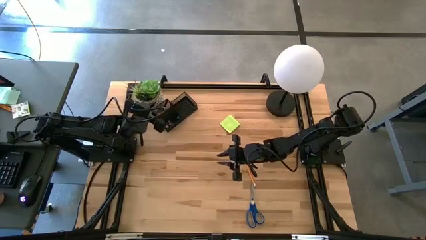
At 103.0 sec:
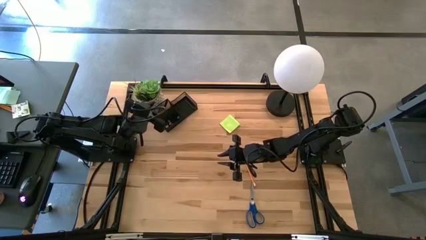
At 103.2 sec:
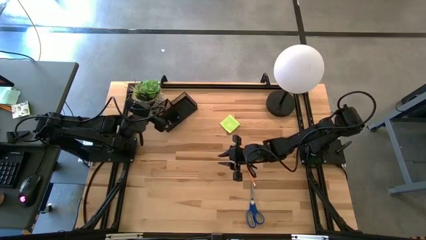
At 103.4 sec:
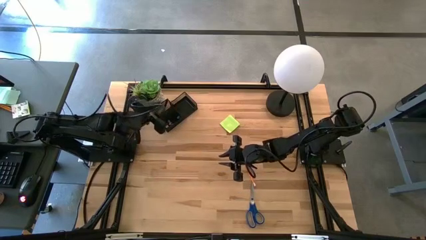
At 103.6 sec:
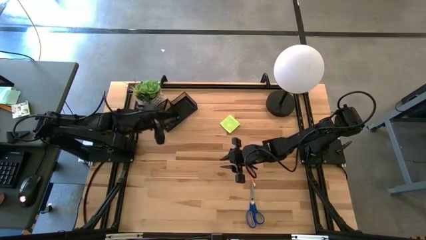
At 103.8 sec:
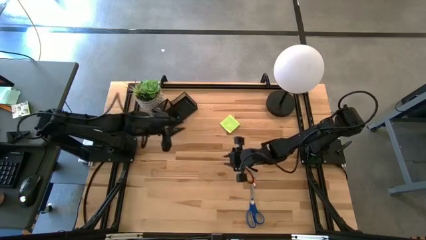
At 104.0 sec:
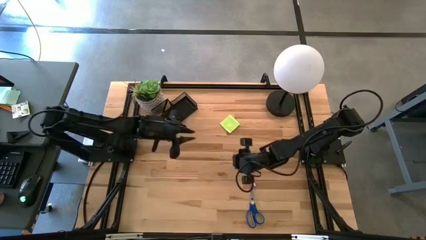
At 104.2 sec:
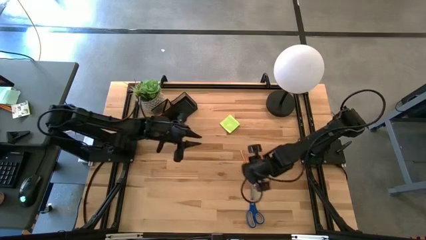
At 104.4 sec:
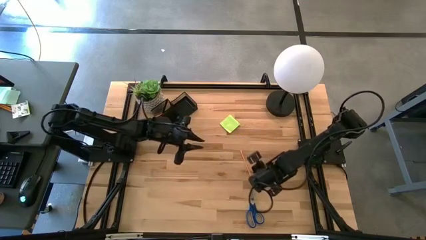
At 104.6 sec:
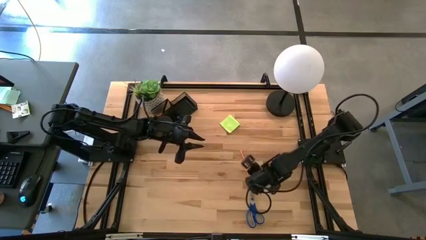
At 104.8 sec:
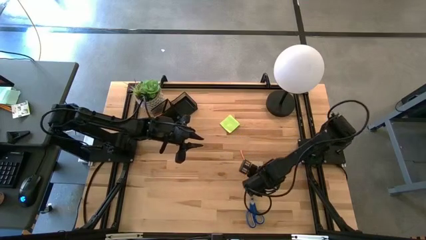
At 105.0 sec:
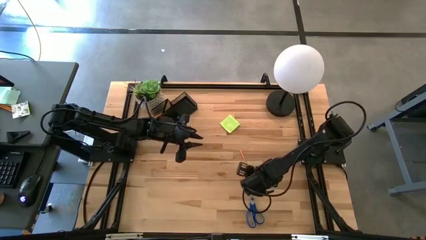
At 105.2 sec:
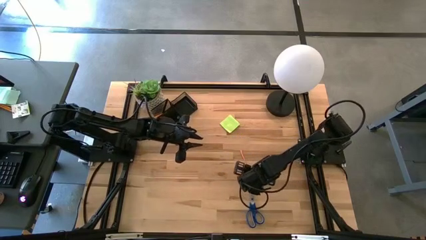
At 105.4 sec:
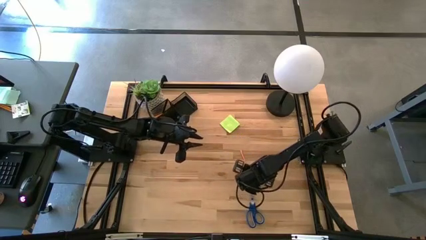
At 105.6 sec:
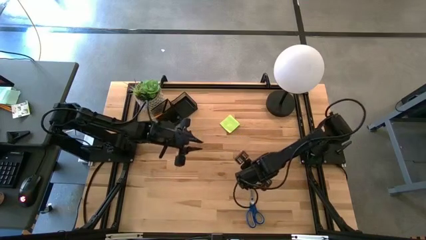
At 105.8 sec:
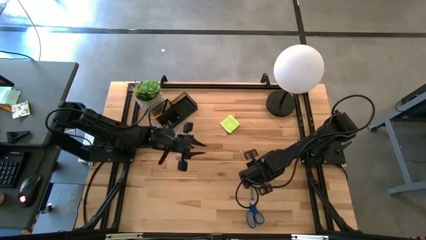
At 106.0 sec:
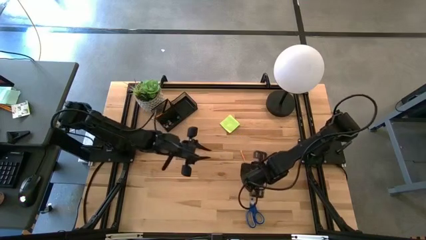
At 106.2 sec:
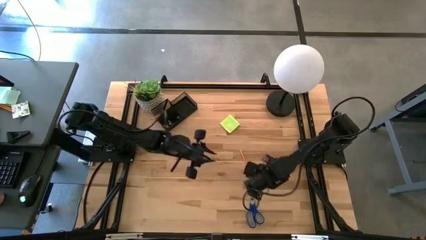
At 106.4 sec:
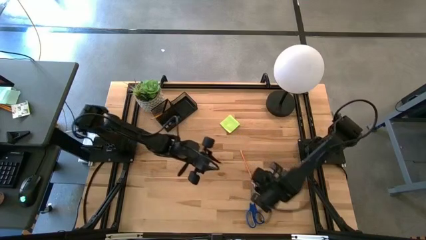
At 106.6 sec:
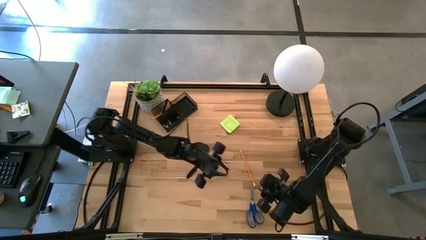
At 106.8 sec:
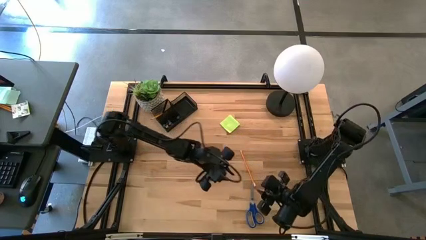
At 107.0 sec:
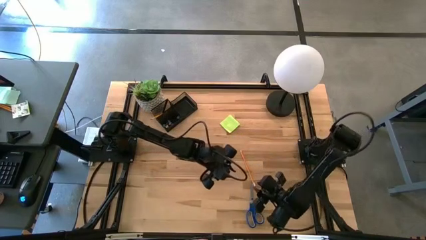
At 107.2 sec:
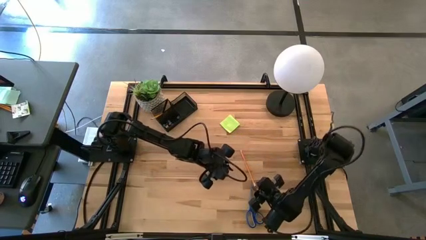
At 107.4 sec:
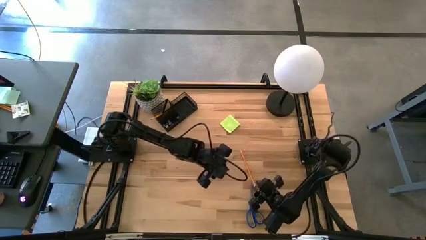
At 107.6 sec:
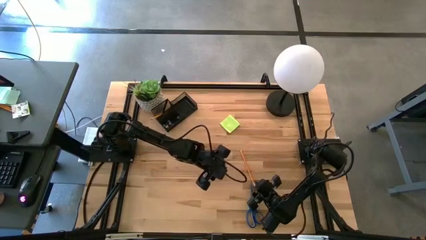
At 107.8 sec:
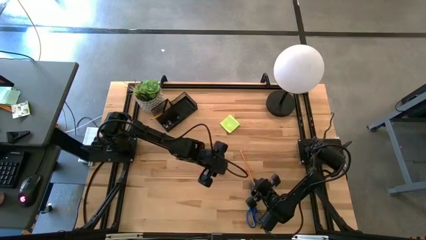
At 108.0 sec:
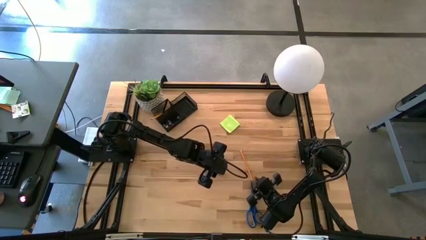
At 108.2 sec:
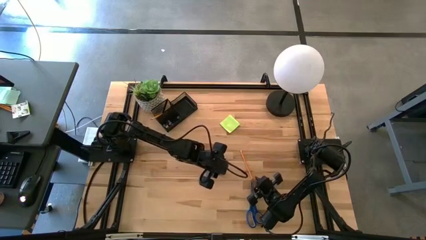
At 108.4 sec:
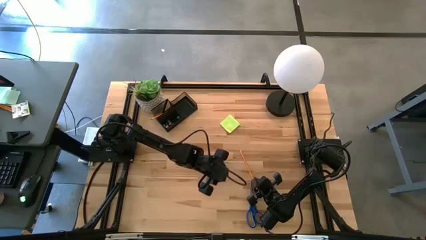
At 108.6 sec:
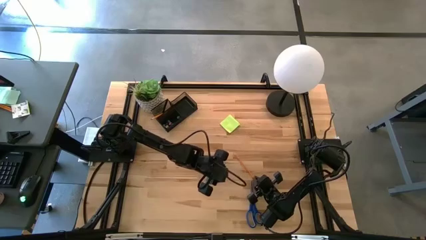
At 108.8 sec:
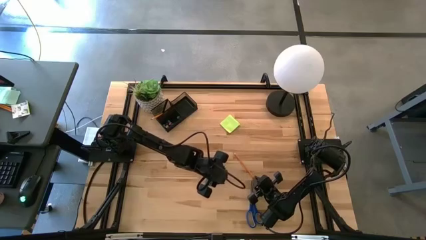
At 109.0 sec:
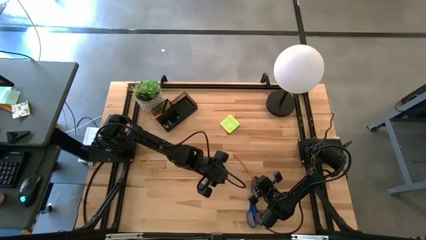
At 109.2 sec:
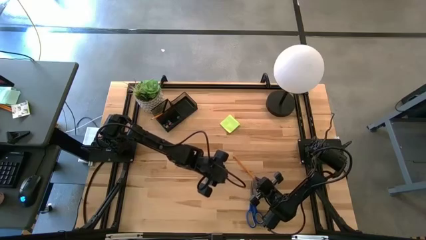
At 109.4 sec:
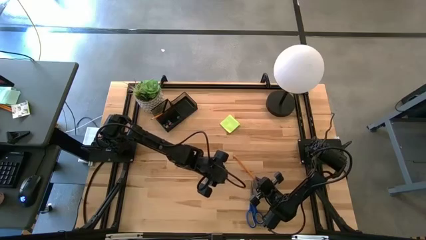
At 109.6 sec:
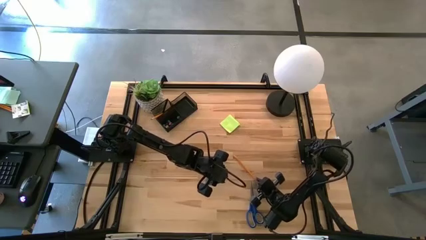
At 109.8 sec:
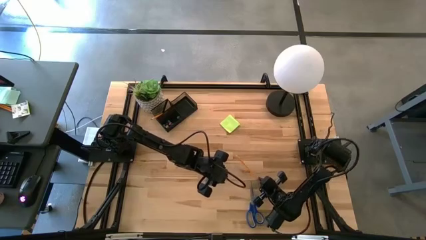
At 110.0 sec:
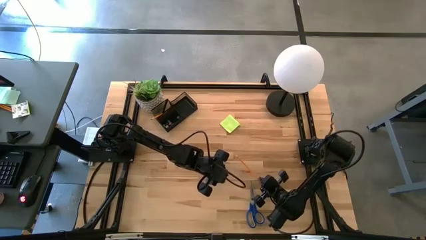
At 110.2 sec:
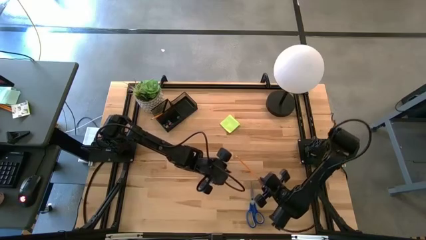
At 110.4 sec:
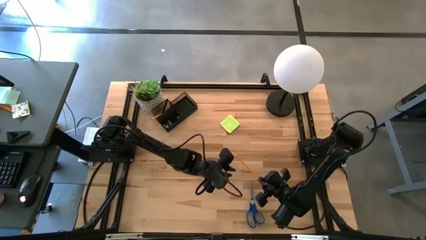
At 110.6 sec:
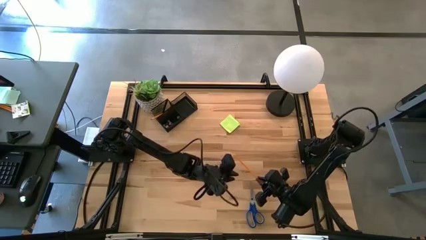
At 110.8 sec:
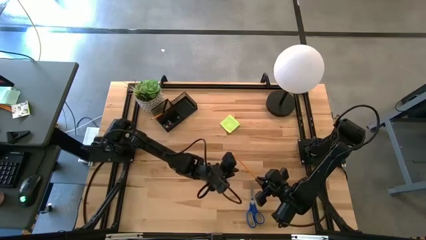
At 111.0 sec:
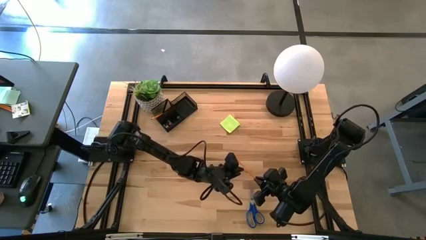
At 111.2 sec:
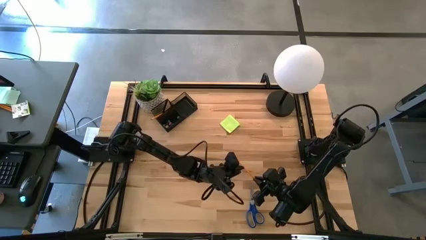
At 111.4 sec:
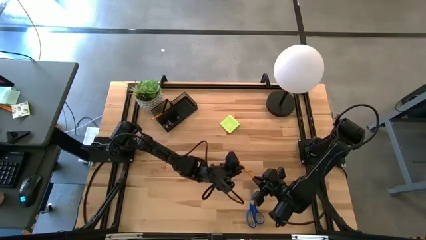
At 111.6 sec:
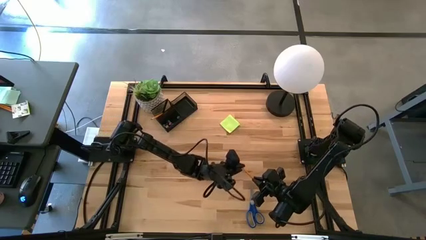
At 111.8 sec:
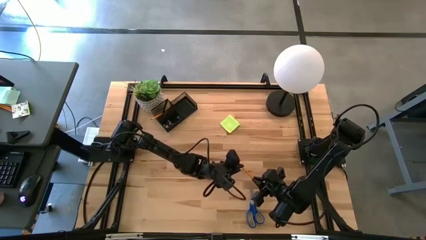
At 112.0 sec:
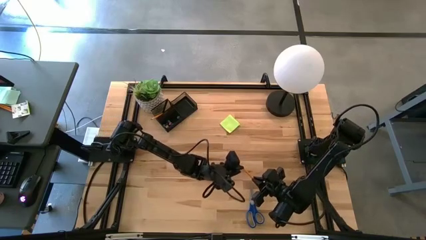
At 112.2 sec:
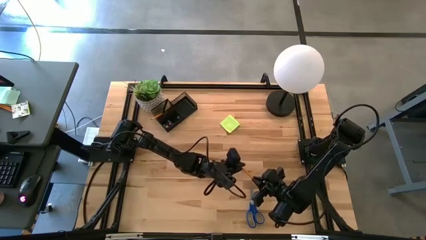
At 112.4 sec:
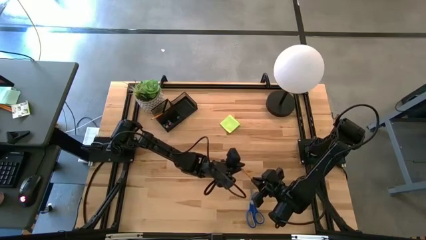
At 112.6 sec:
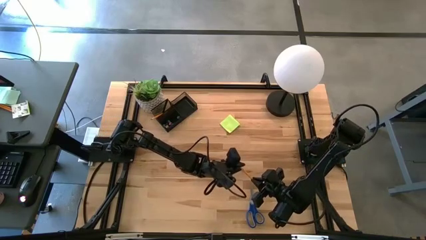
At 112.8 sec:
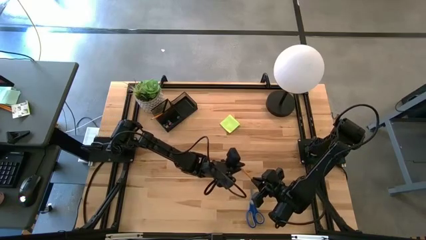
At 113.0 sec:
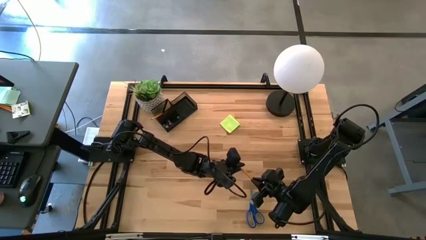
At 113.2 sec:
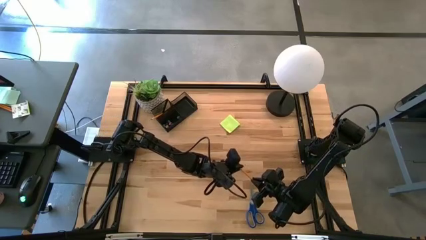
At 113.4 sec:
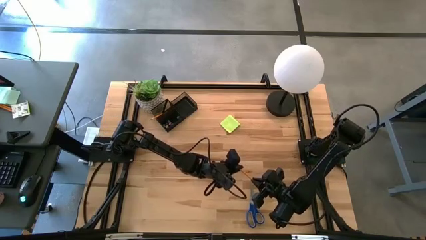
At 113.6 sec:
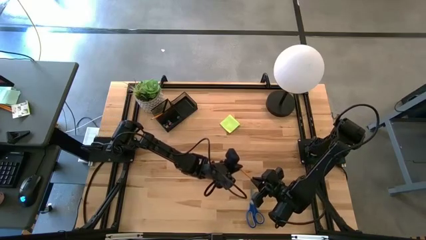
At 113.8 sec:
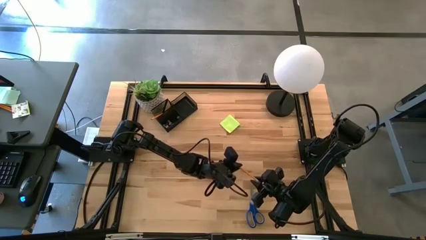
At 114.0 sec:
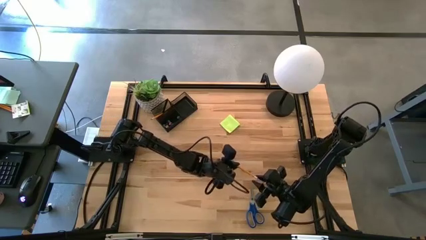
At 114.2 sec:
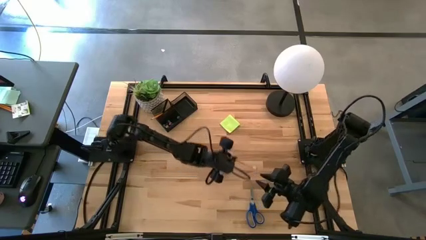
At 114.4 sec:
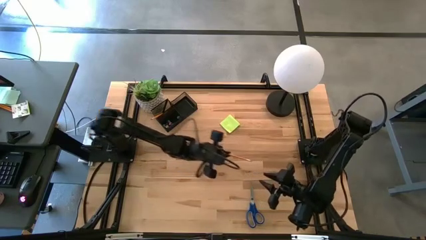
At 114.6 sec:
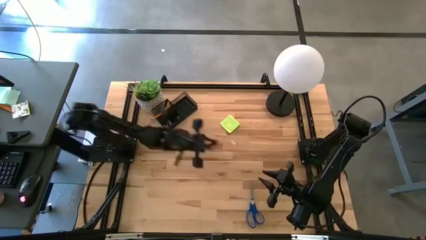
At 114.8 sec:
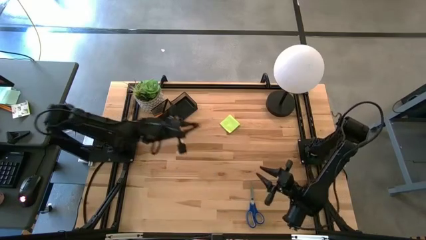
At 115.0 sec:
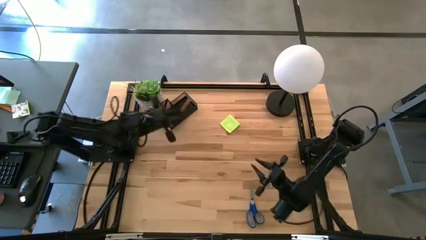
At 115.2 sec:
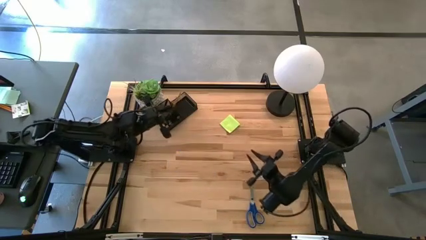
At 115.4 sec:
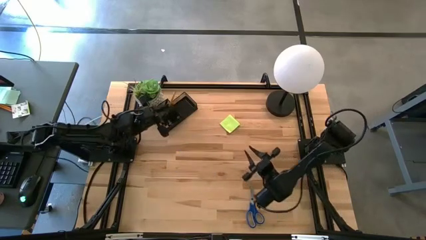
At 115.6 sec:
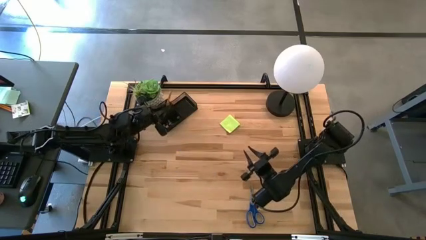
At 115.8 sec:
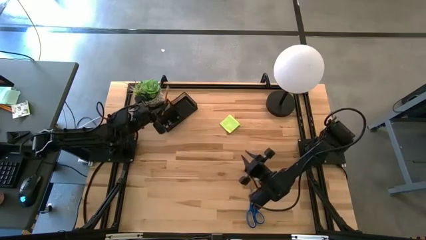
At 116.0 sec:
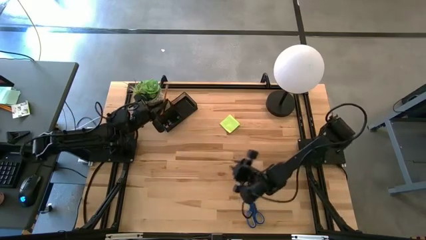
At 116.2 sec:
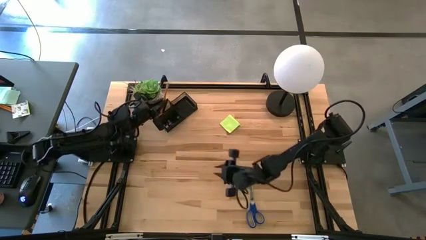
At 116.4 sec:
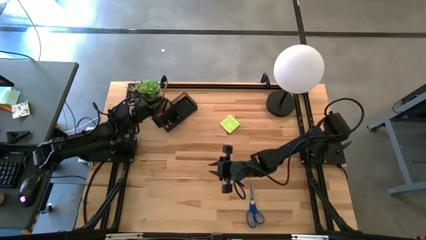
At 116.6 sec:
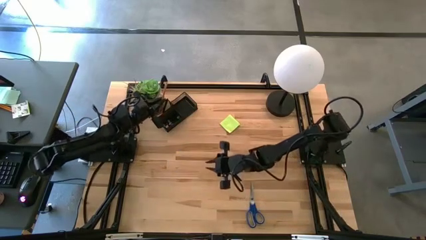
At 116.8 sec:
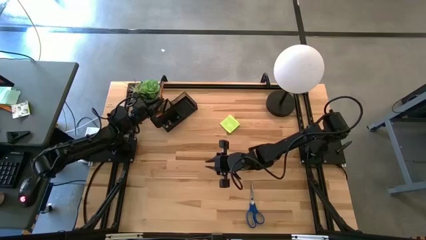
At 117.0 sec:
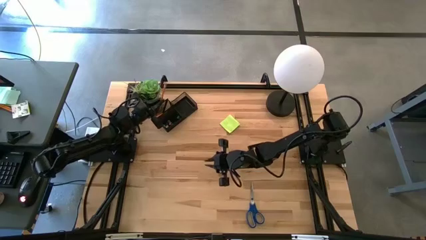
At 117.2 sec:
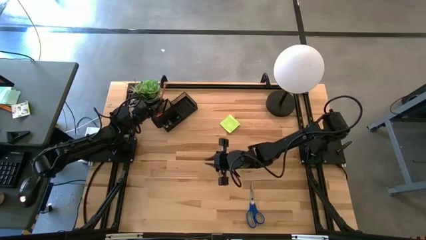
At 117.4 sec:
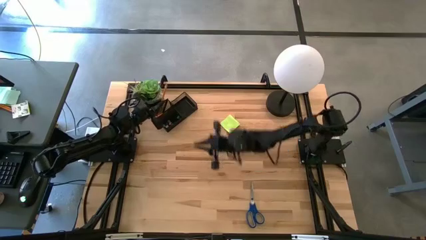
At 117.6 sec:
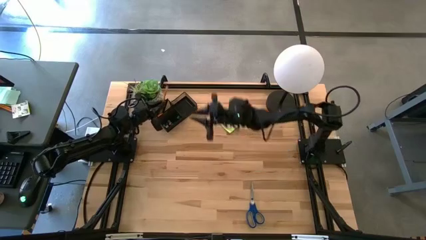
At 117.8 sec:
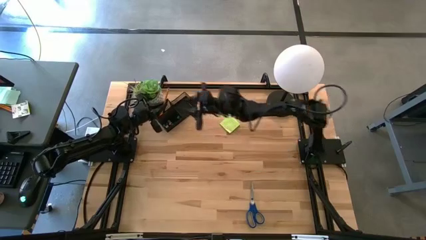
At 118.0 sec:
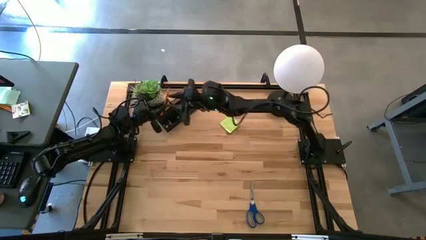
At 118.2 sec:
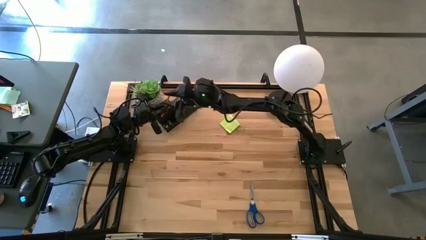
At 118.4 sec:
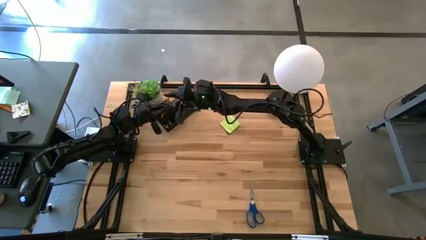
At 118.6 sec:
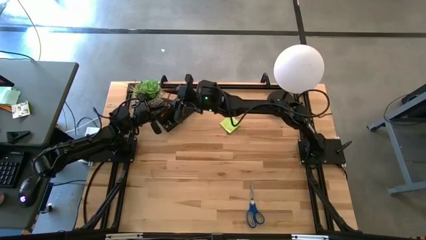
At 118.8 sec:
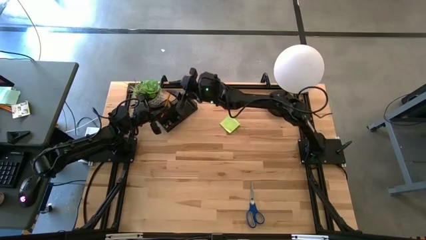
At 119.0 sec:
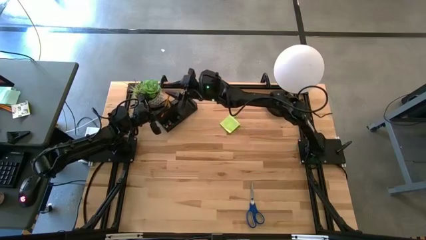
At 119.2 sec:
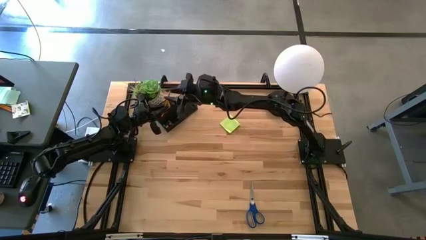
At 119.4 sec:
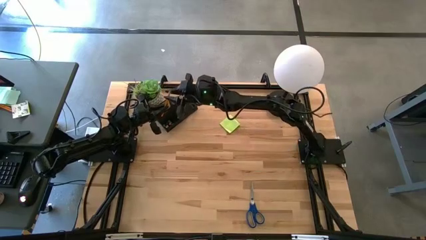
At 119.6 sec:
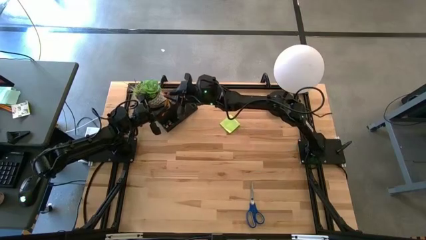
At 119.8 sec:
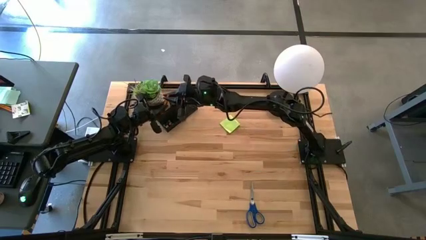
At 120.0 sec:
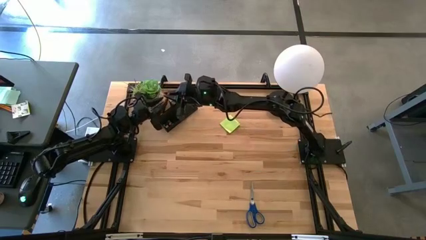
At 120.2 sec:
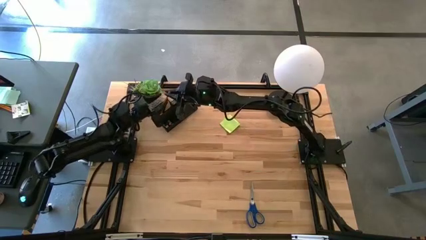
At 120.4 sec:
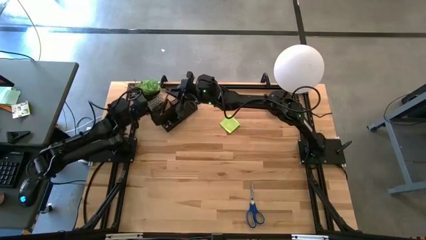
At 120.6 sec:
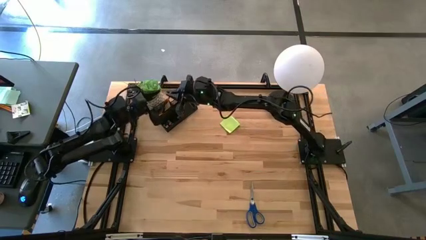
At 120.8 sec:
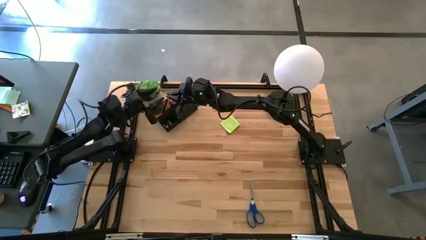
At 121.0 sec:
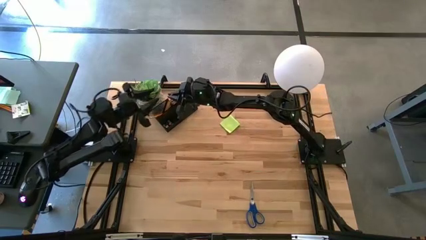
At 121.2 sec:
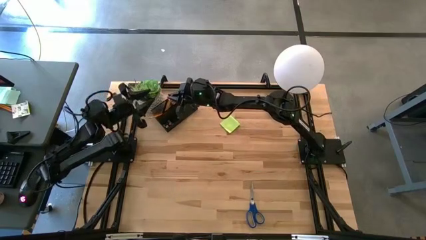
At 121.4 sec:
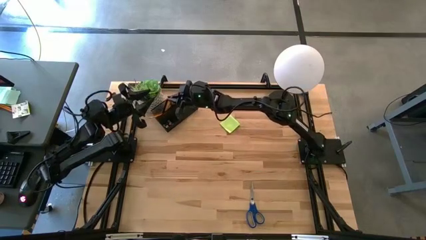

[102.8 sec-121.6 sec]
Task: Pick and place office supplies into organizer
Put the yellow pencil into the desk organizer
